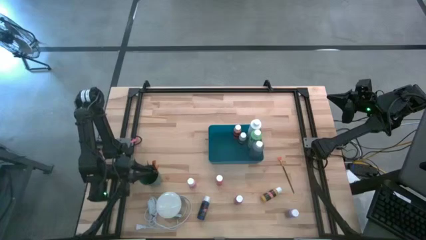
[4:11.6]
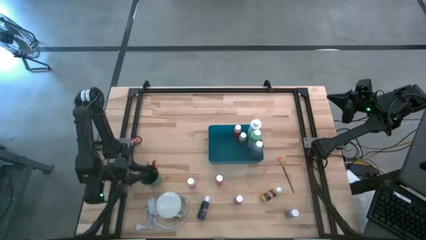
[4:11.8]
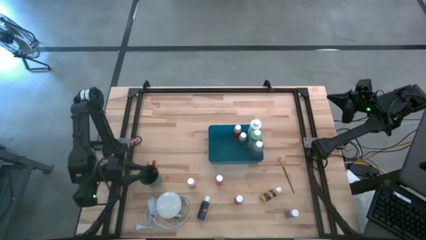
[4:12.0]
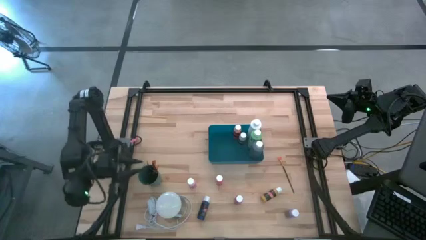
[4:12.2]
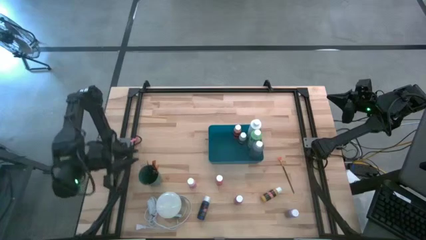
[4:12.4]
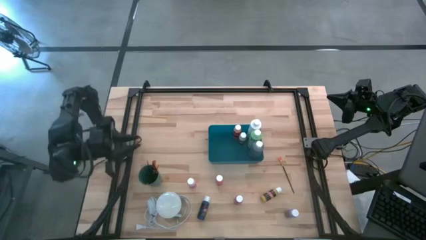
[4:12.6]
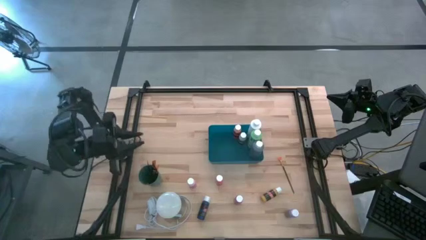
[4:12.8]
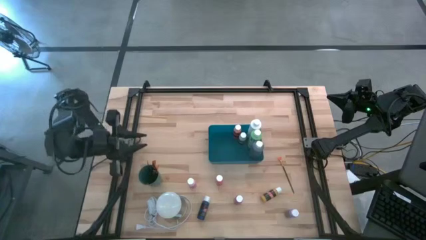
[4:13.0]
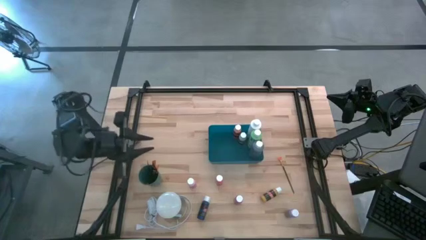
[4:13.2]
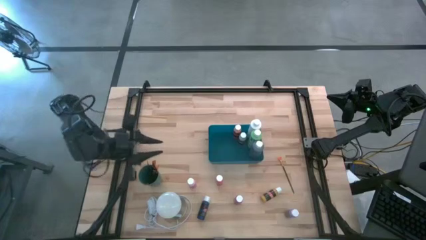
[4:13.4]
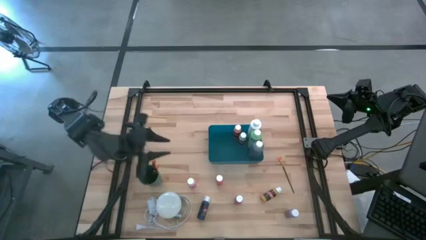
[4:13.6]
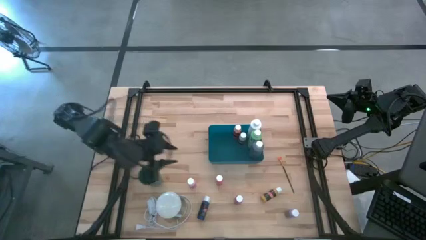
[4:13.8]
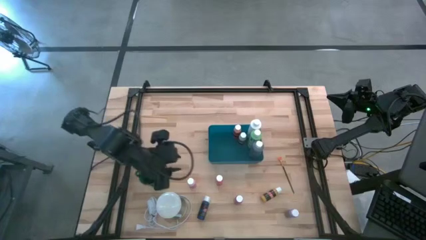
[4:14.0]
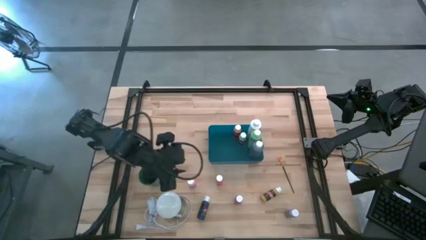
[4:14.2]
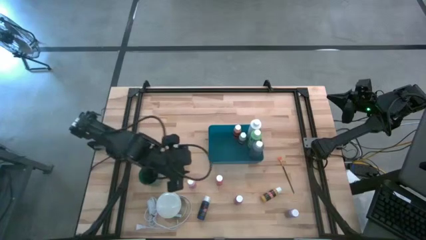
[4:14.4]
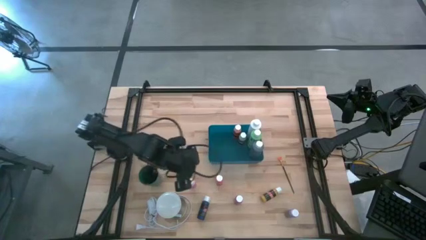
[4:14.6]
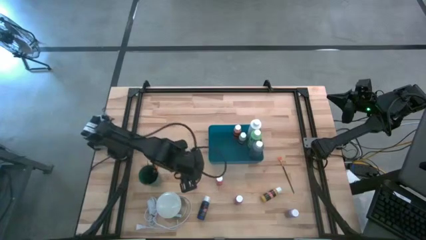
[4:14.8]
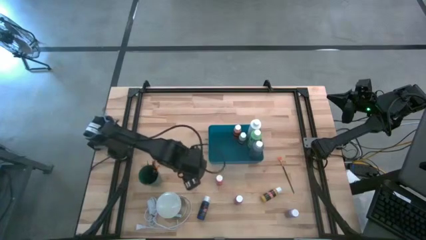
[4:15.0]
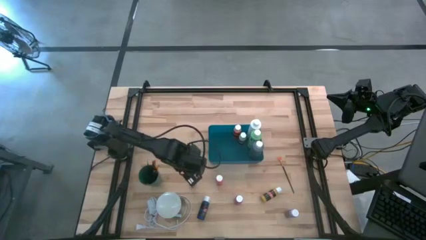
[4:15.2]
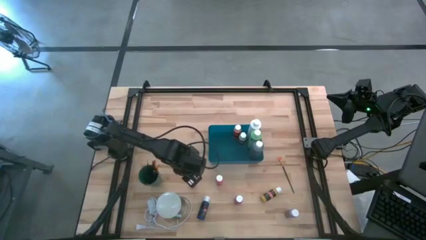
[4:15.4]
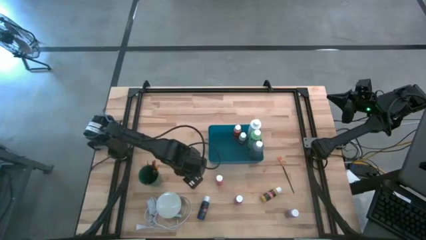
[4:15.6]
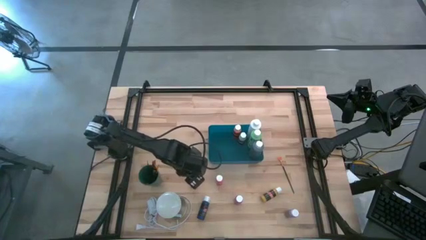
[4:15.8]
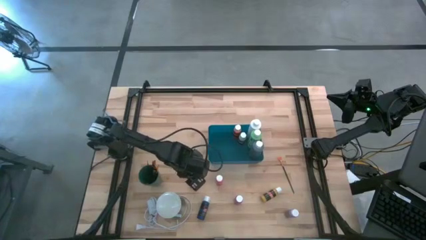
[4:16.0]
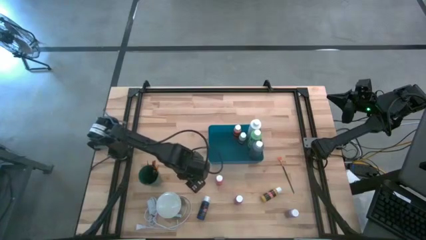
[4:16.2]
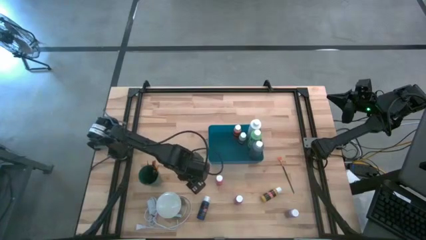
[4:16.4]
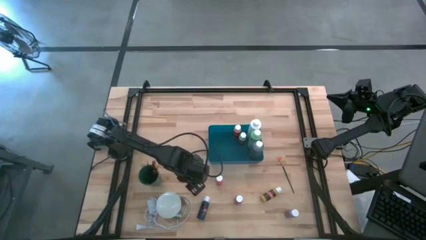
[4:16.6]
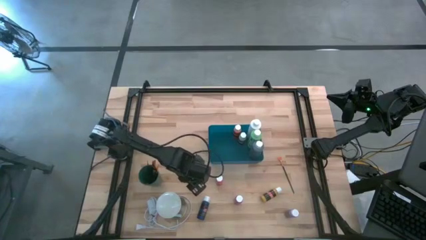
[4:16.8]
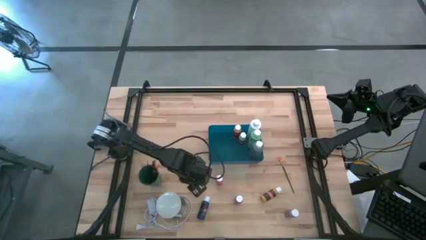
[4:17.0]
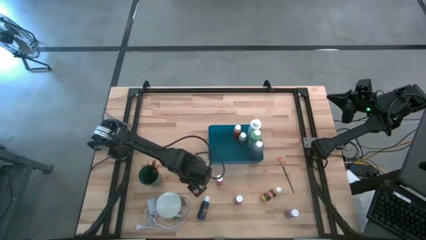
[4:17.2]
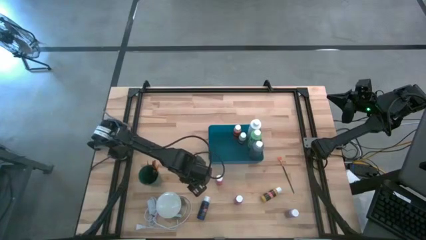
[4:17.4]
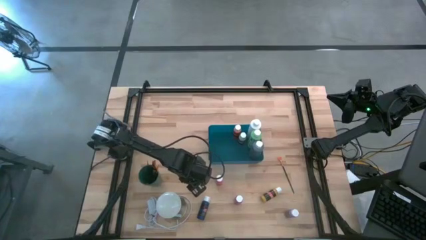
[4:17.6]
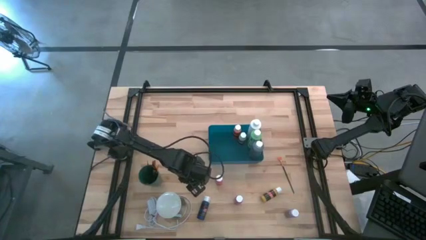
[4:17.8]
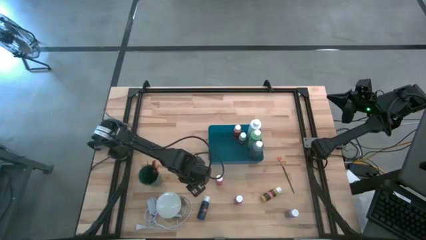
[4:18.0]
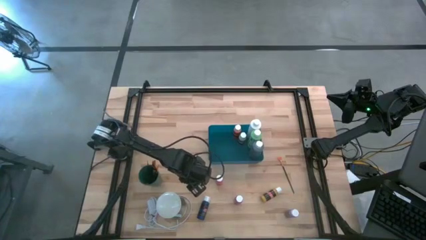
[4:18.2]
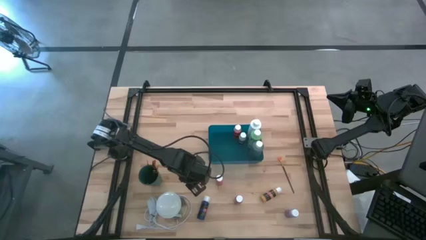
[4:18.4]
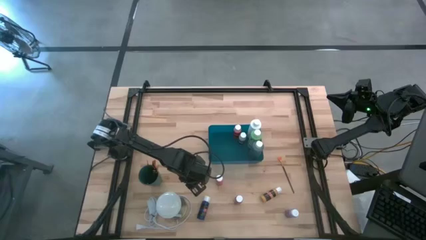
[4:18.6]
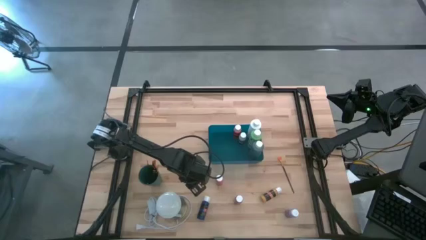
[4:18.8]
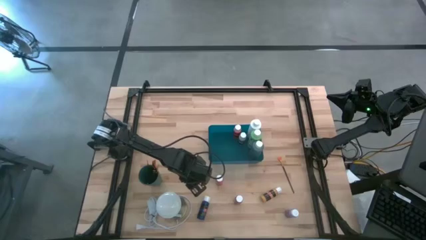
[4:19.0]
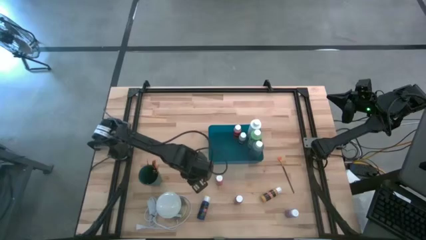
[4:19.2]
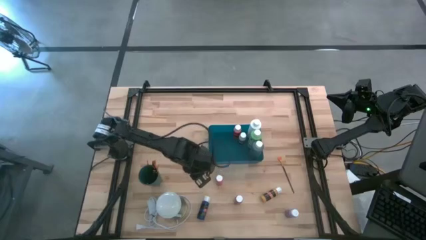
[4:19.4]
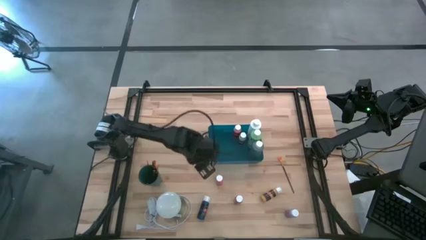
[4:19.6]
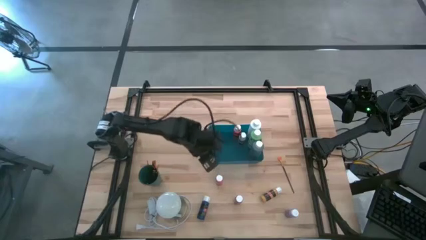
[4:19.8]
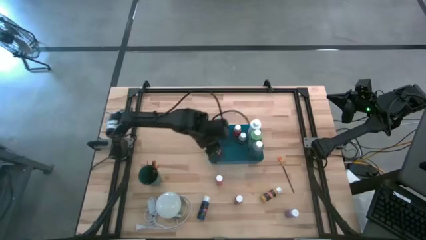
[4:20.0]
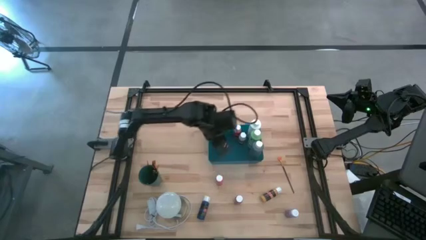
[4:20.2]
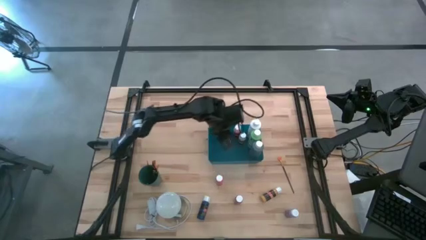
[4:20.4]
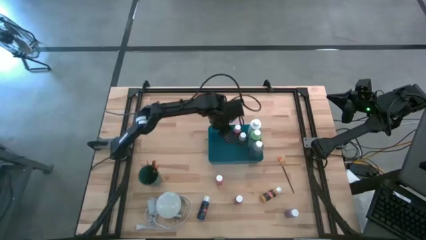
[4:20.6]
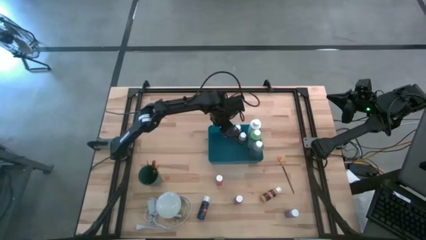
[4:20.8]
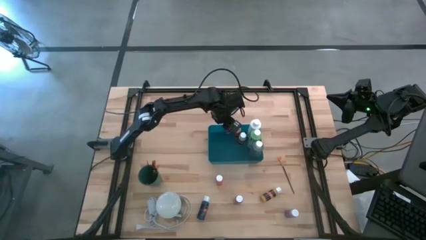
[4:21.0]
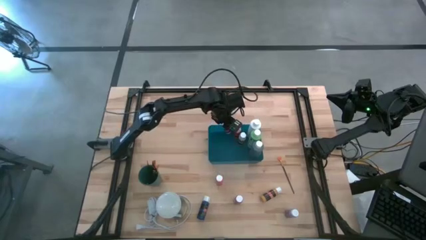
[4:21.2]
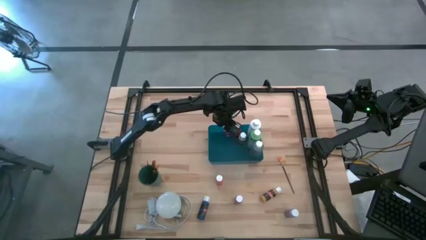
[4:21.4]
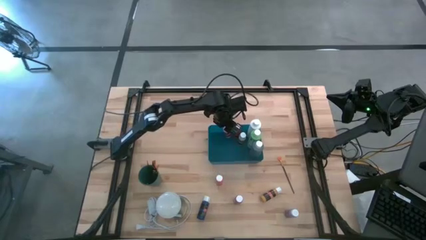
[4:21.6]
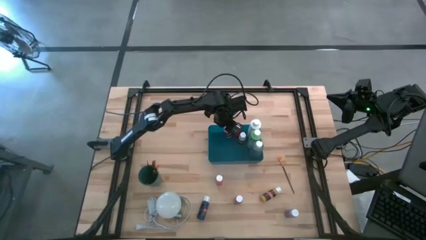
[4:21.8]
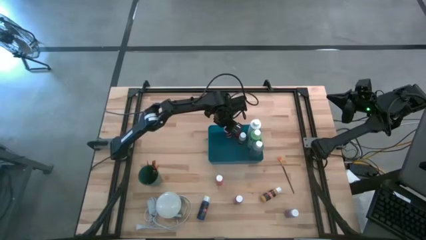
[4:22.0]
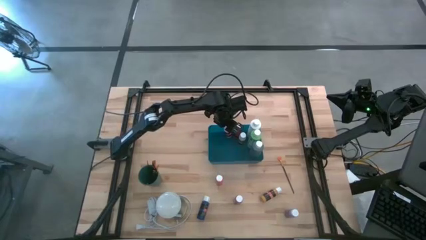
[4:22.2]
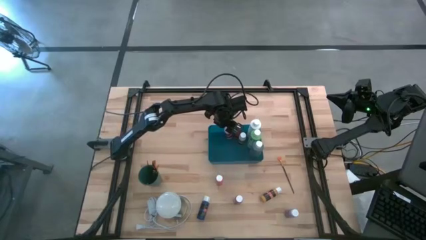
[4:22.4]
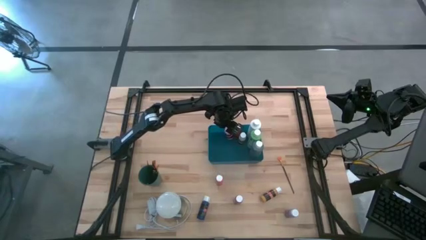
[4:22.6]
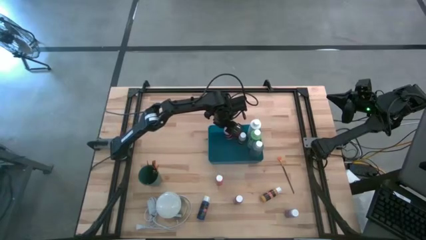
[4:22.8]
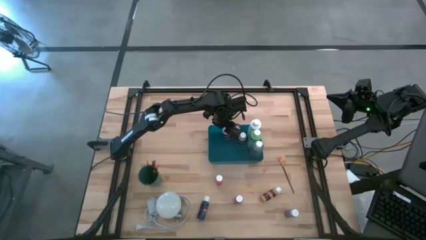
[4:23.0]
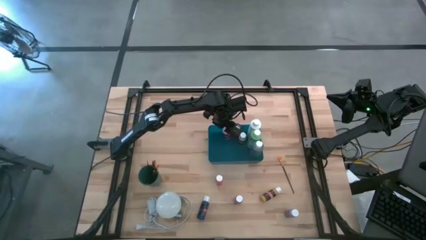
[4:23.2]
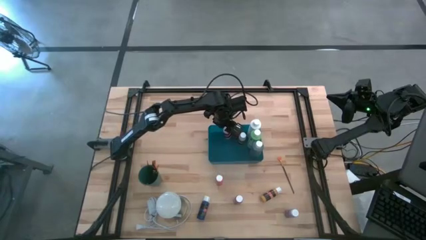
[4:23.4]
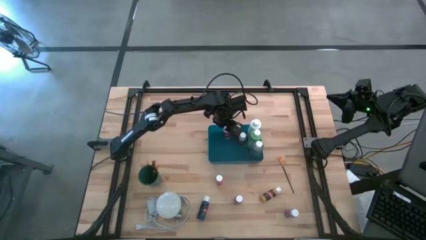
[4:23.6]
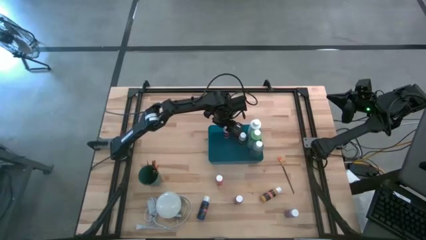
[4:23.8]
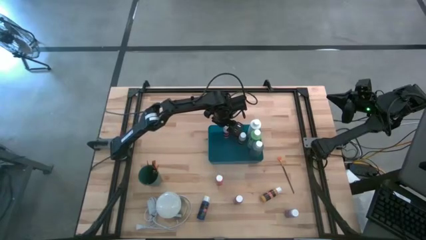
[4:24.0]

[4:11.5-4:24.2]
Task: Pick & Place Paint Supplies
Put the pink paint bottle into the blue bin

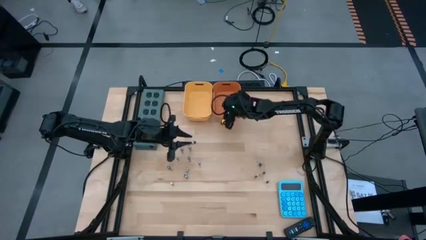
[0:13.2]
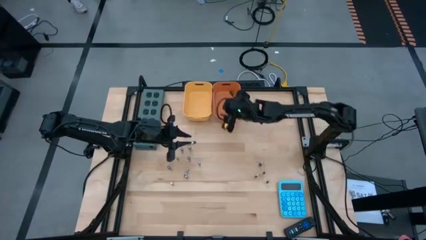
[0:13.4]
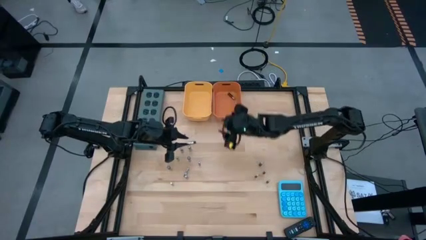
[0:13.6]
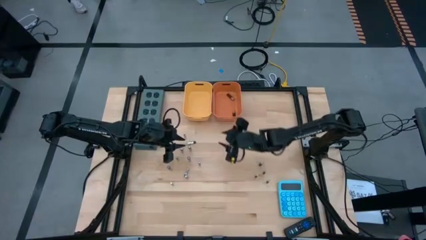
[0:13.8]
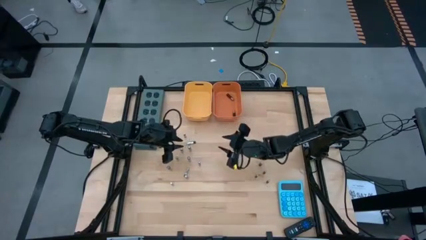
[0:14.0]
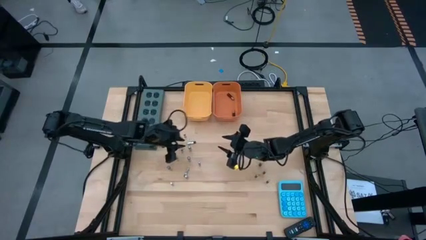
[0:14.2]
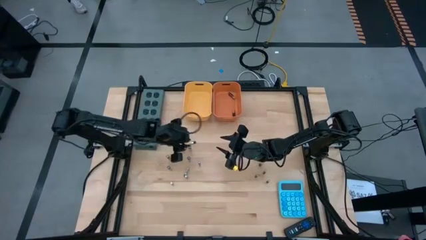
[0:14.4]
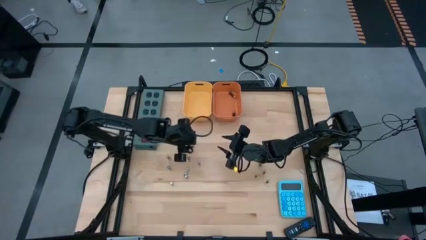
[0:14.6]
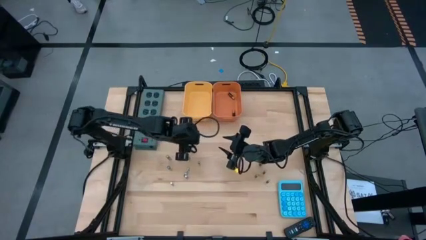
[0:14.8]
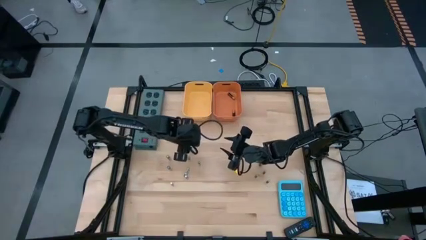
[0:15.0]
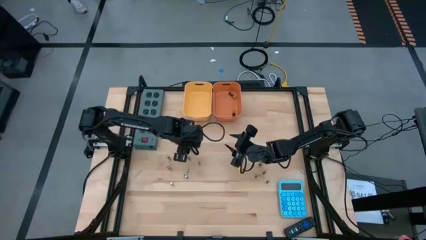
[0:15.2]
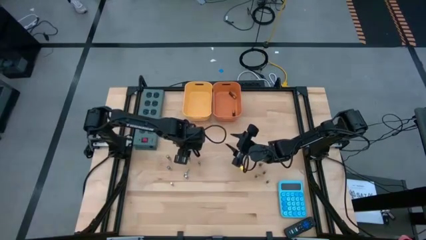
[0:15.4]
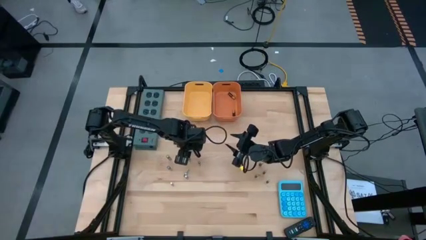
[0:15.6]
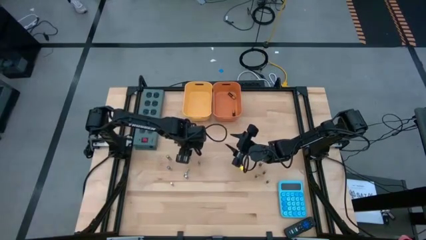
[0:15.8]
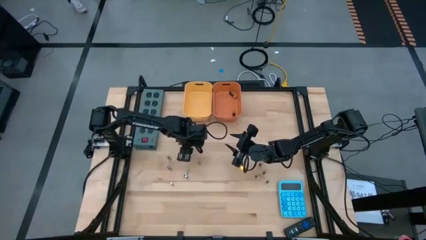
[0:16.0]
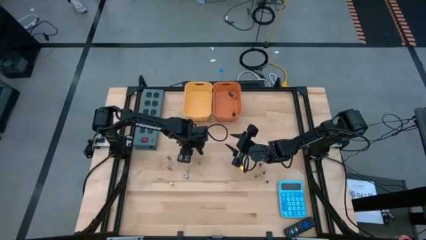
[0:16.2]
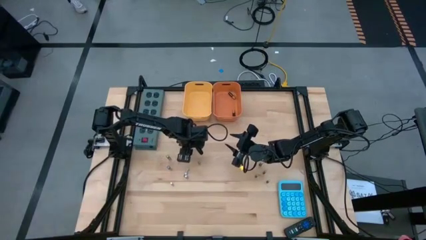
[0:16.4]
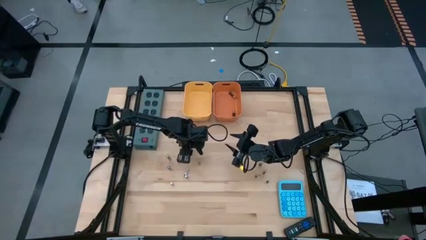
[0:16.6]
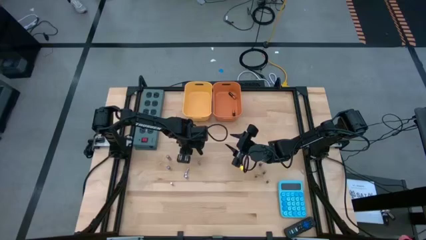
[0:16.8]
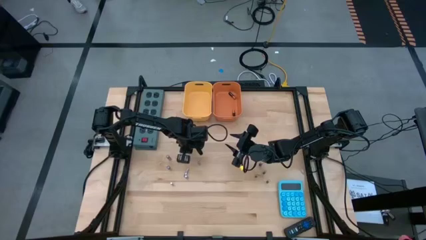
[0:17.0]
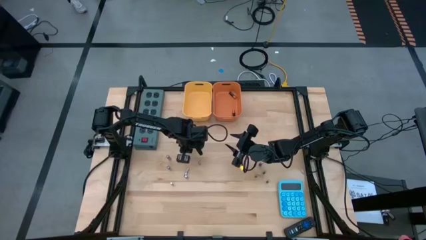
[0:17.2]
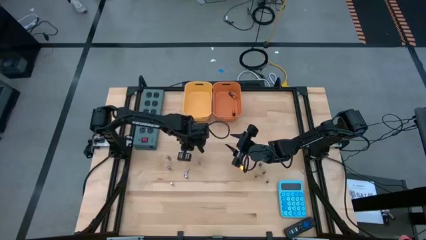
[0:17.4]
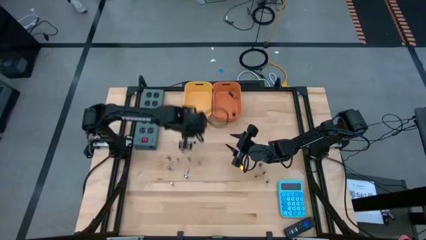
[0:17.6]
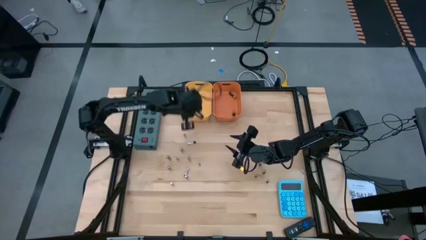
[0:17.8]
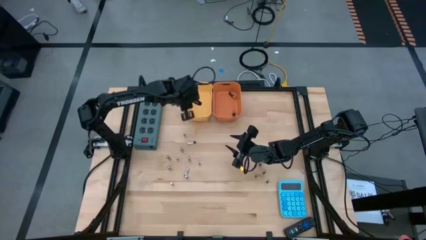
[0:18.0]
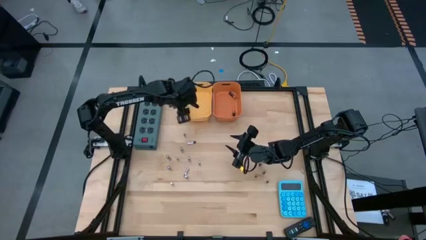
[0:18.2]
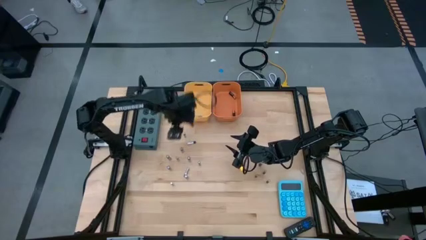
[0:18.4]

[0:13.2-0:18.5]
Task: Sort batteries
Put the silver battery into the yellow bin
